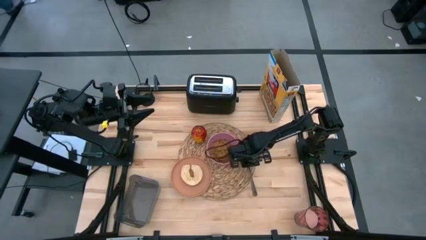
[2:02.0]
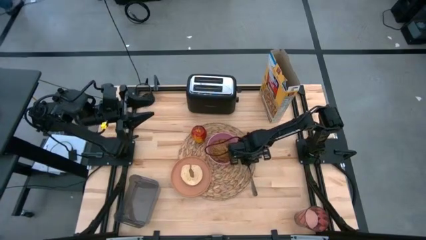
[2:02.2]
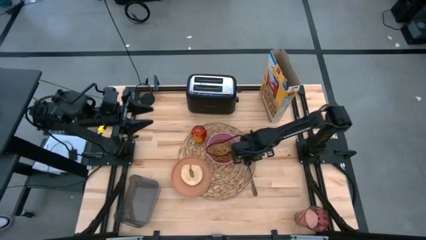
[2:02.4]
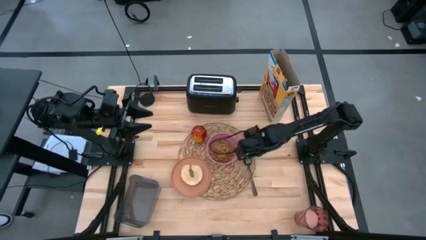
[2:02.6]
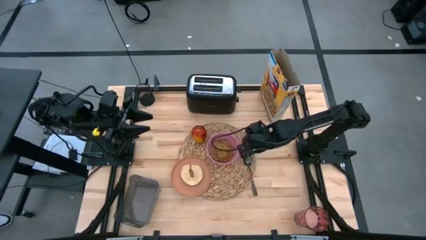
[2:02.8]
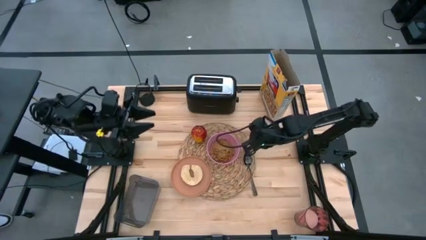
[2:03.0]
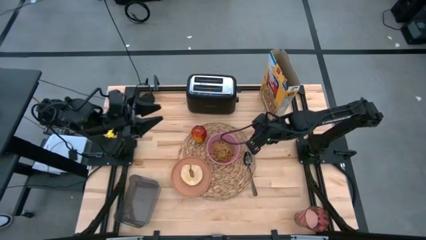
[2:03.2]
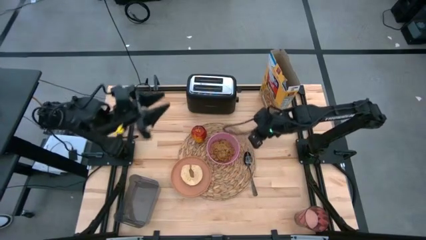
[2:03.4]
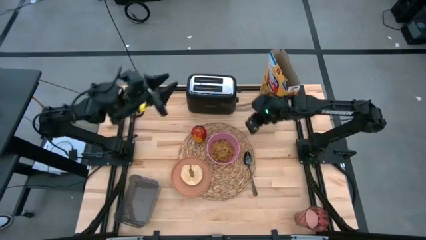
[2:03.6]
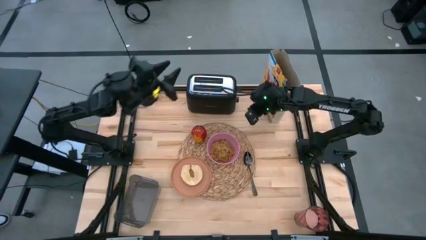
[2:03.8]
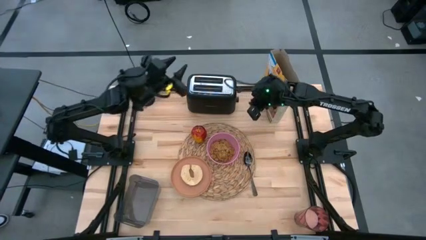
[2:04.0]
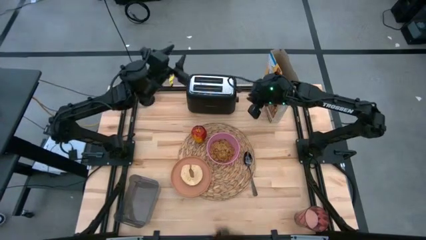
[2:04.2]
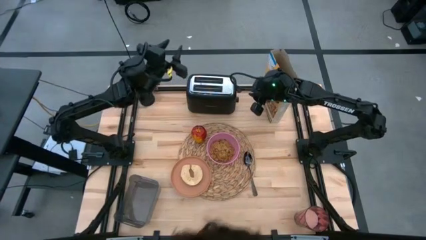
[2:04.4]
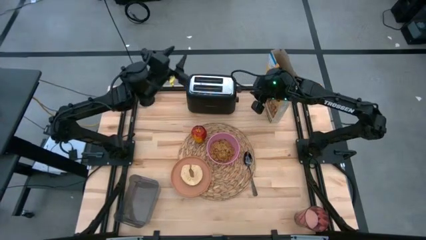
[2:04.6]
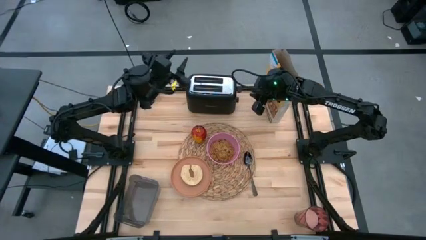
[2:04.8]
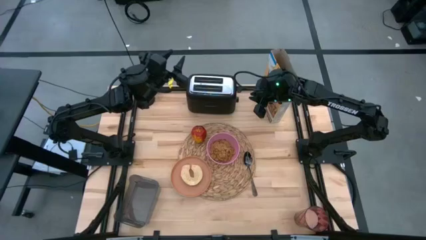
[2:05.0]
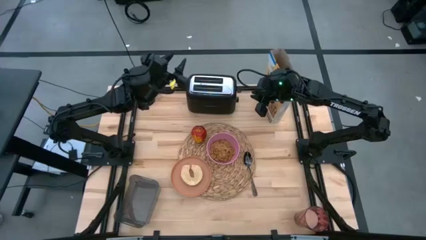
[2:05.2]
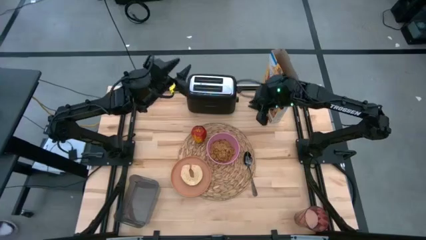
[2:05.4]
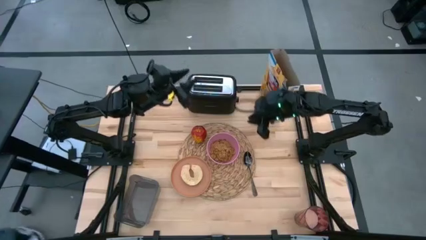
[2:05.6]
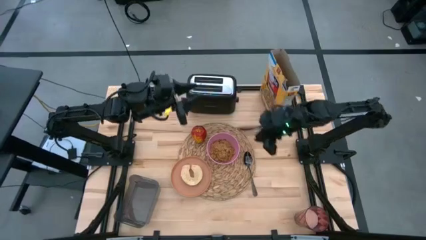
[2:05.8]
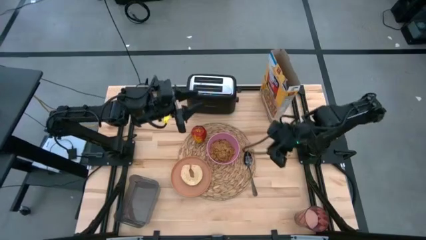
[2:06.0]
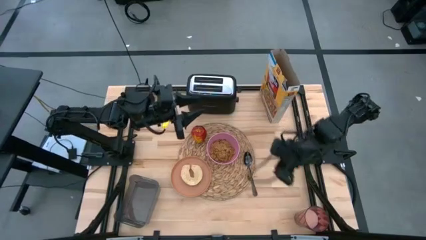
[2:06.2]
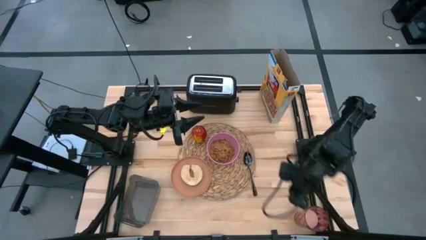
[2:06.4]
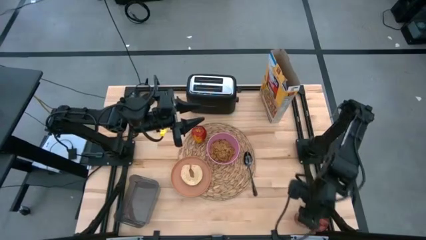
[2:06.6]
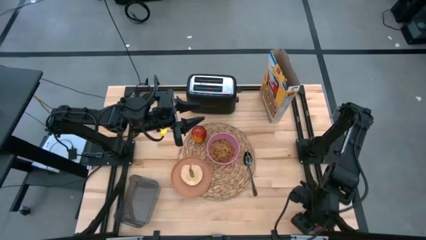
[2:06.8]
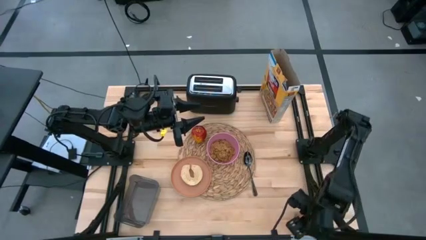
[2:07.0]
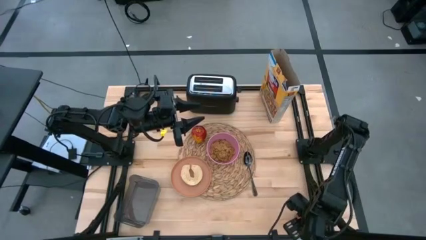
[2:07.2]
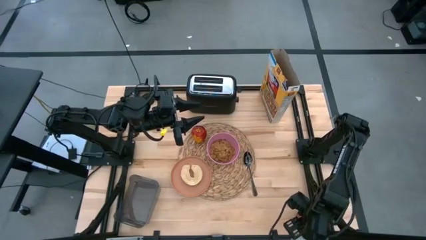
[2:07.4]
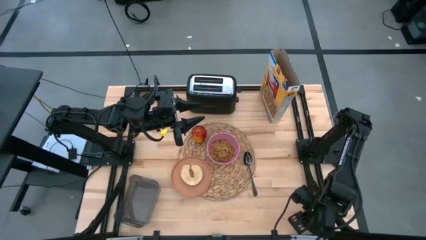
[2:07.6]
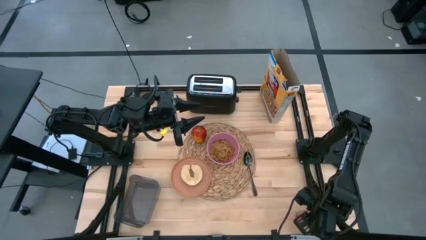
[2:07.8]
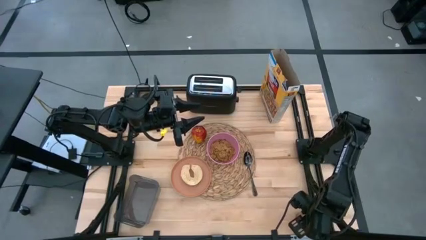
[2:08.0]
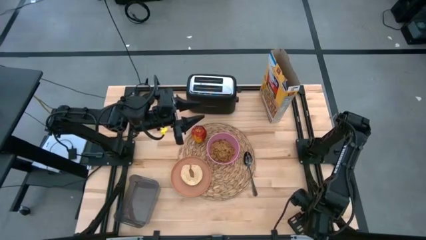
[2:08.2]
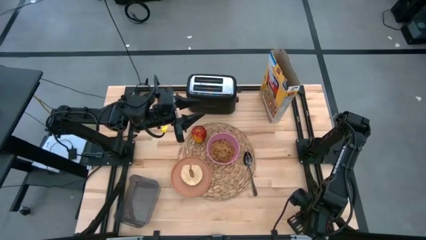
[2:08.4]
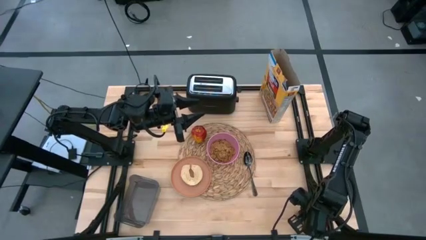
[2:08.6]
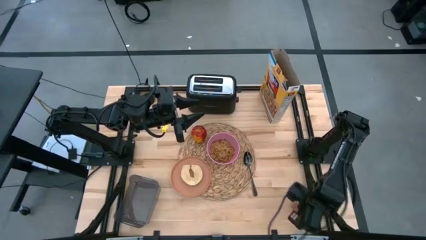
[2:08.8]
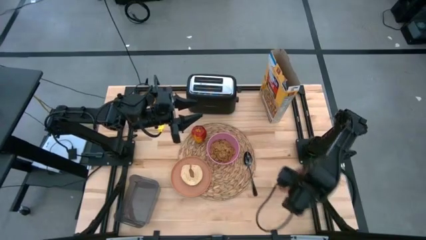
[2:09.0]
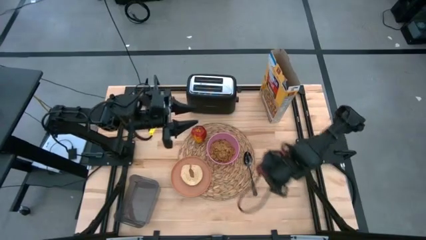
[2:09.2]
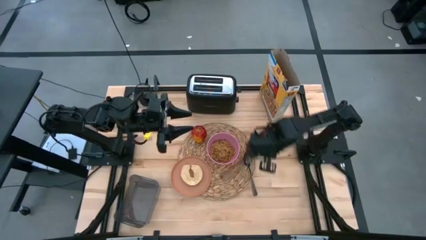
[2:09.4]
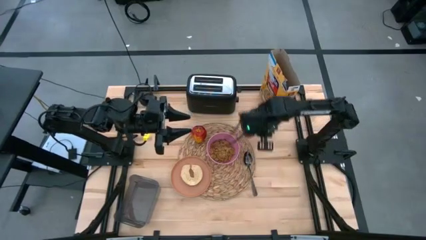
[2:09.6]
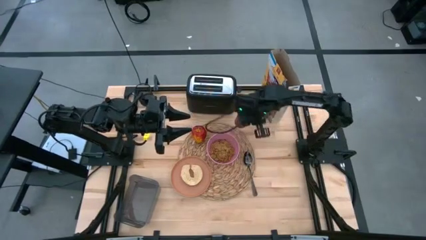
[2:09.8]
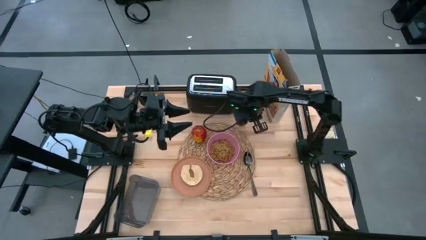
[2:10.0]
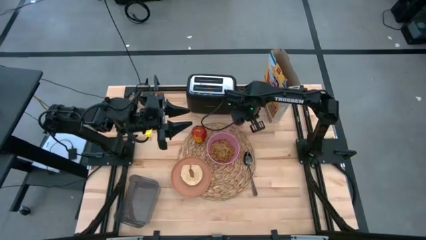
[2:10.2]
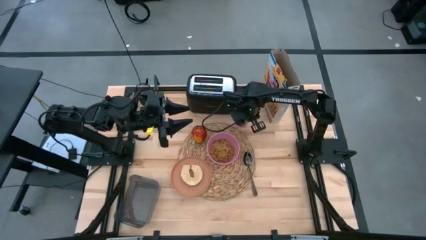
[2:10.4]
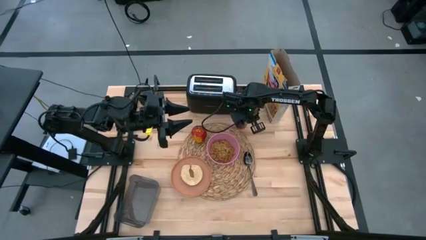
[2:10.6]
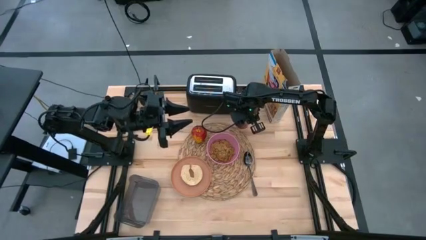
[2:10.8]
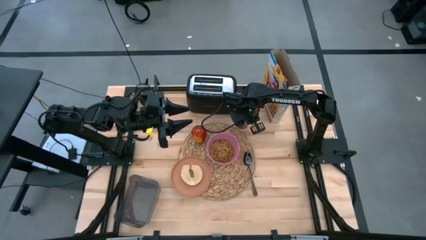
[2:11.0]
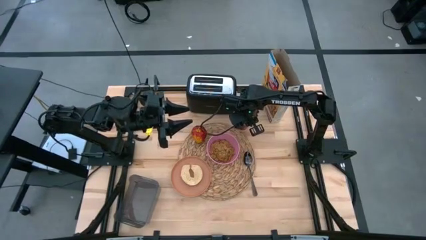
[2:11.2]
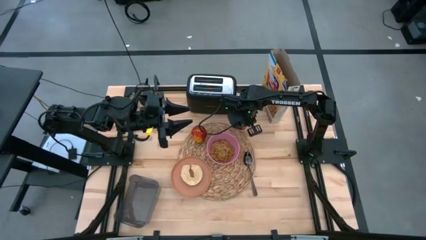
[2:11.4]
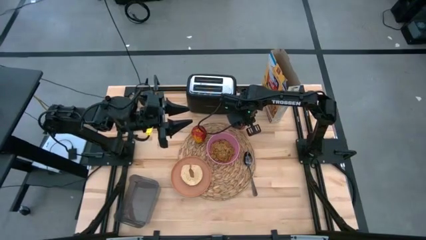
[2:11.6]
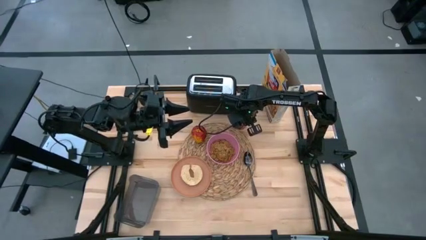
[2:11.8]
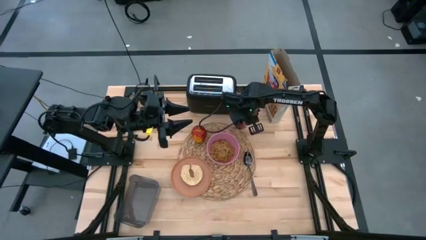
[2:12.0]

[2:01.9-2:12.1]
Task: Arrange a breakfast setting
Put the cup at the top side of the brown placemat

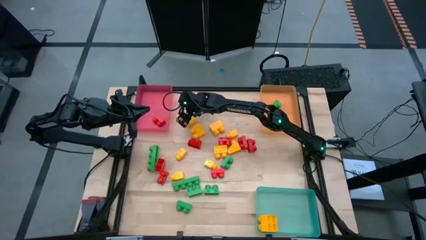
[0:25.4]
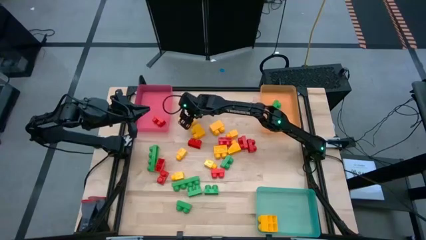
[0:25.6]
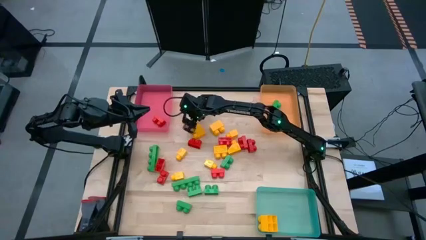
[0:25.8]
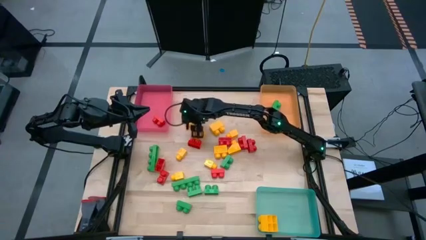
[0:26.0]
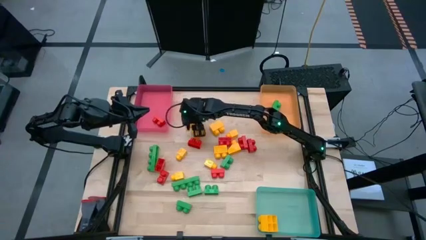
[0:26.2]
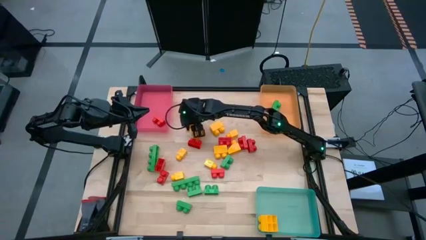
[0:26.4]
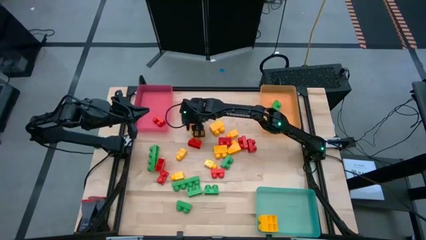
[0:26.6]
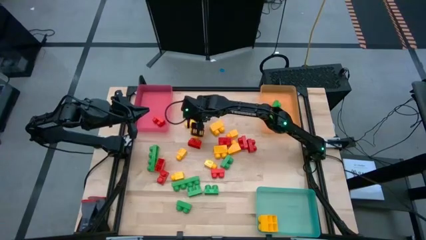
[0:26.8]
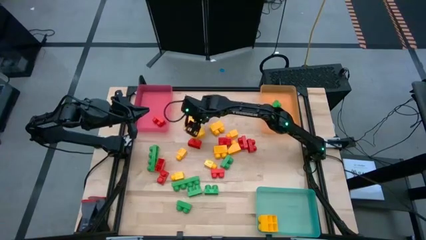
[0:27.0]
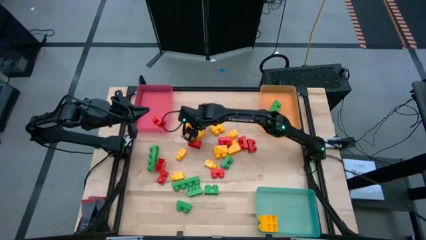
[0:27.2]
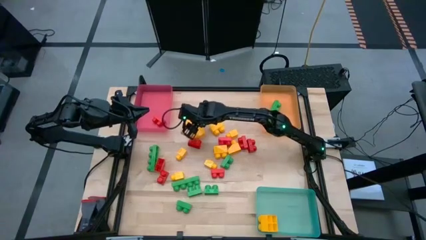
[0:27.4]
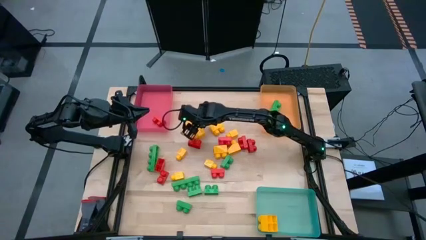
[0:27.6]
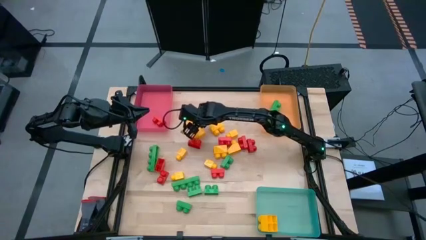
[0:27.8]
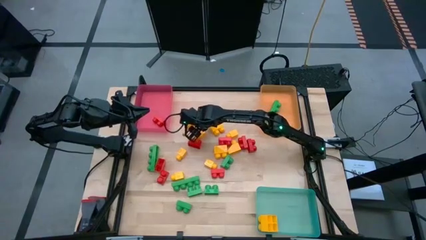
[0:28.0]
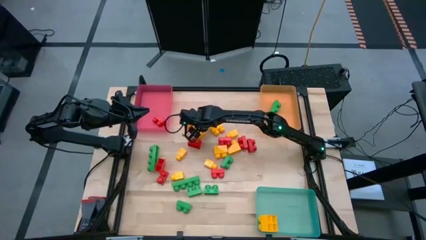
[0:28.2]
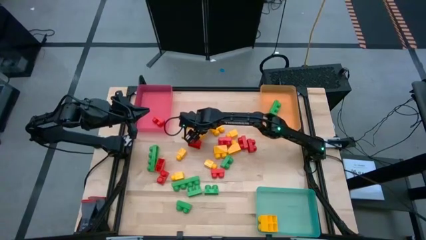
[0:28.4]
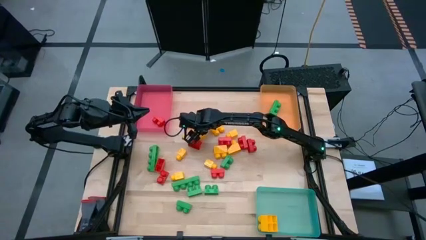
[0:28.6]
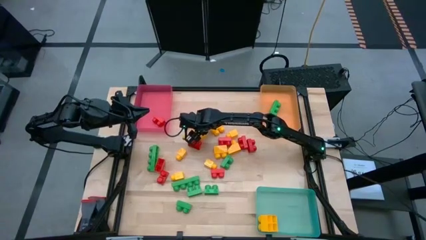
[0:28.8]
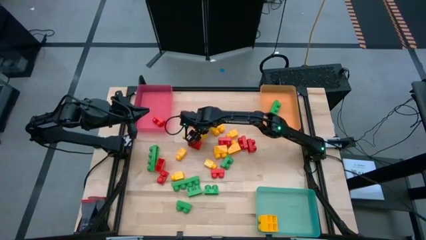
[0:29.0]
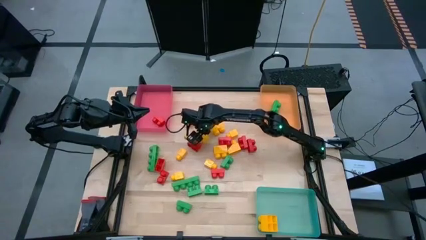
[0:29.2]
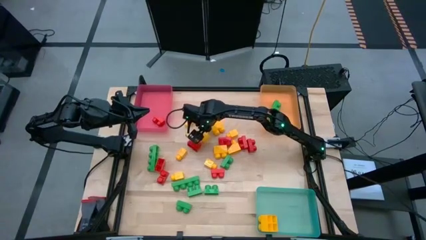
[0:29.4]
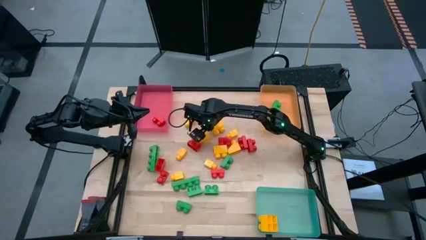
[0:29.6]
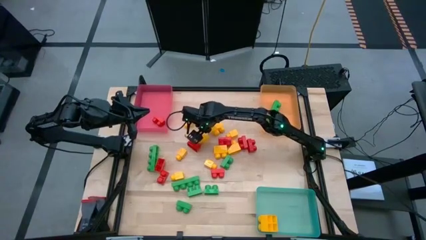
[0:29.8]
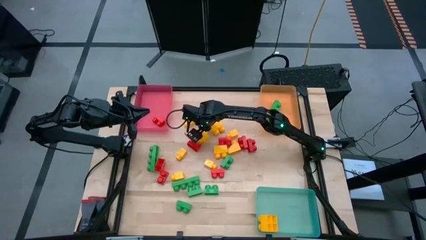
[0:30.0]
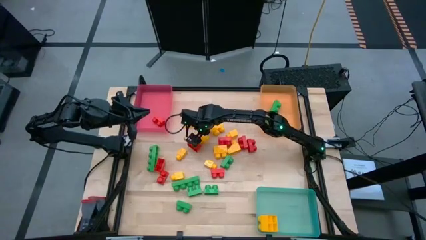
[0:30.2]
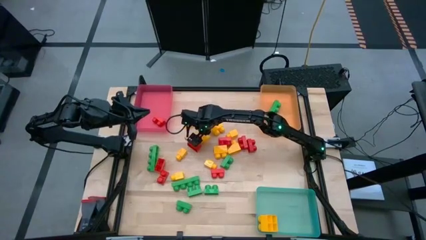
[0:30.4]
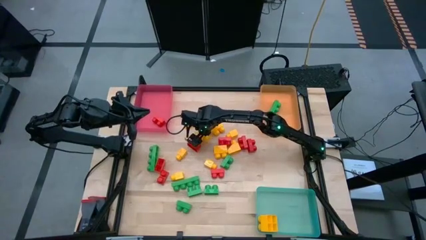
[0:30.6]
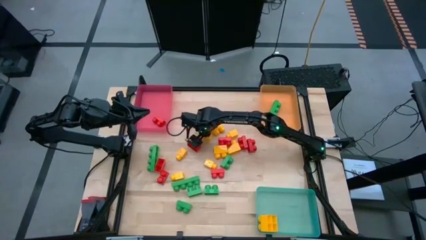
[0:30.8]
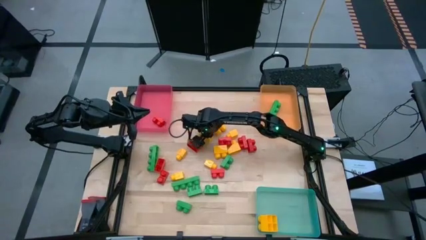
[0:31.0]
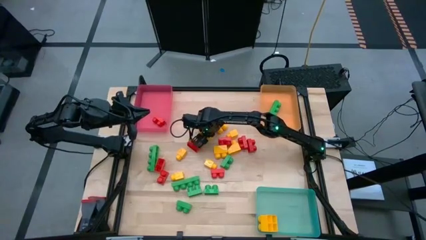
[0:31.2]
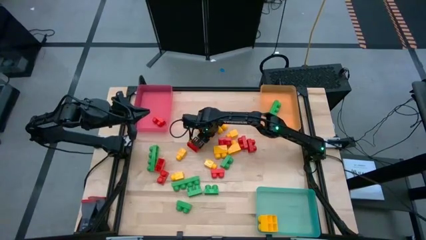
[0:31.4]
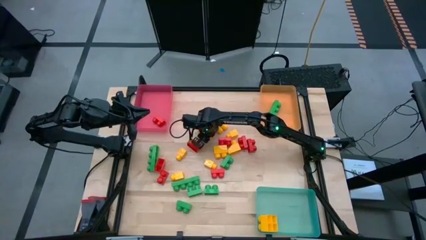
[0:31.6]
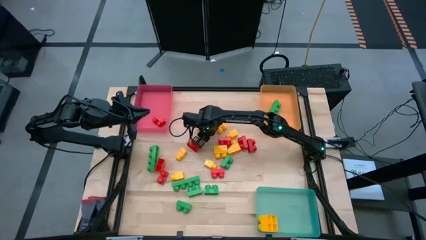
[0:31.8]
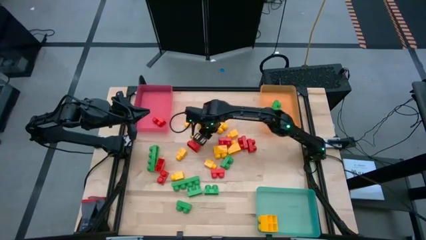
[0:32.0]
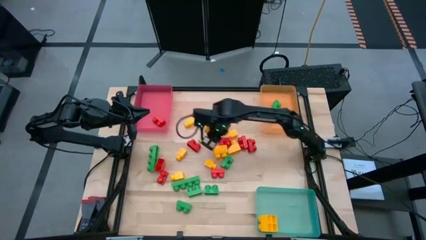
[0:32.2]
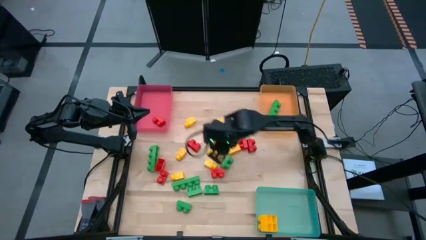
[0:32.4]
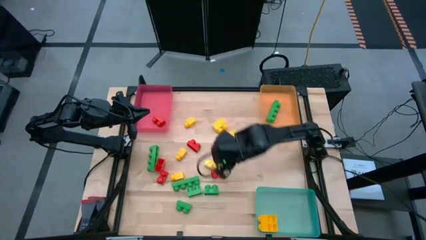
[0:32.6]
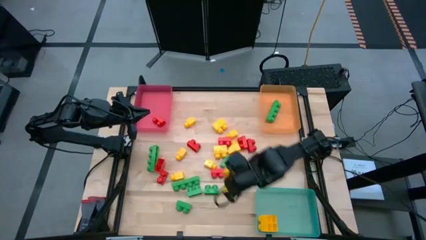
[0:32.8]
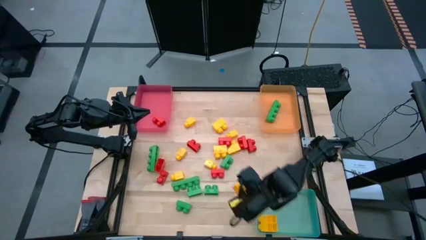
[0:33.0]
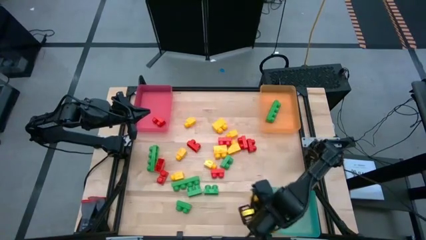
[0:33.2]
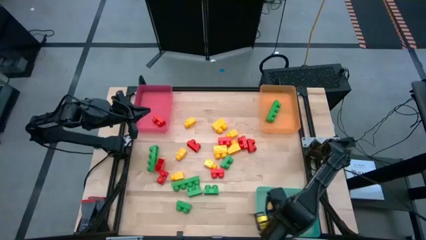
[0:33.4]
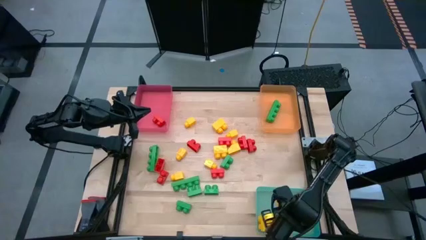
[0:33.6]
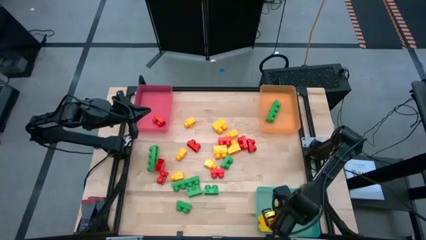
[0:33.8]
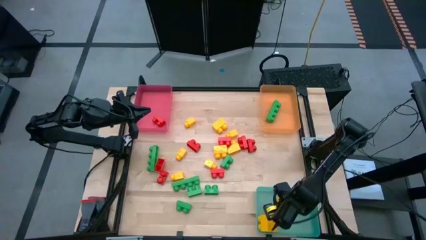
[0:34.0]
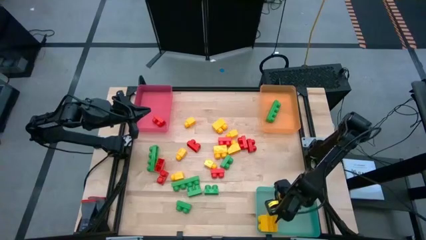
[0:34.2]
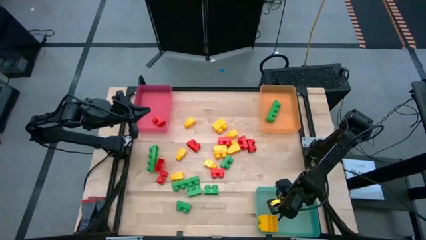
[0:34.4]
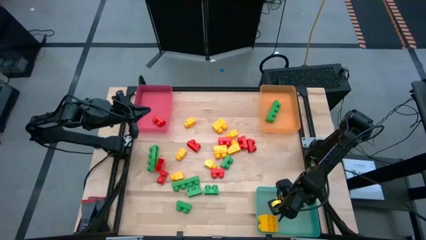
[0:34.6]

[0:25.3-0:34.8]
Task: Sort blocks
Put the yellow game piece into the blue bin
